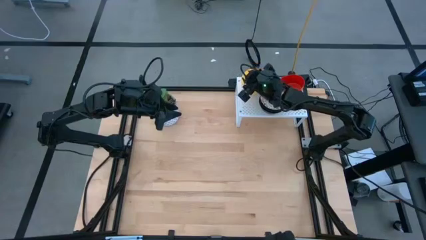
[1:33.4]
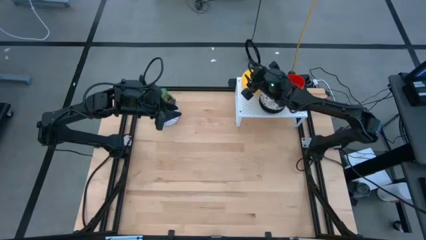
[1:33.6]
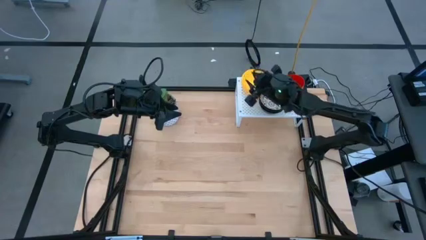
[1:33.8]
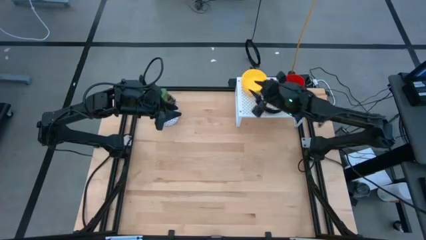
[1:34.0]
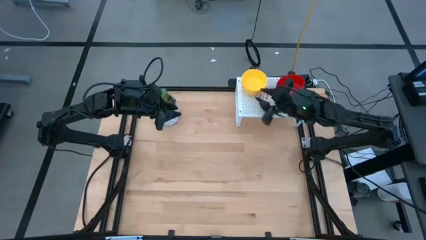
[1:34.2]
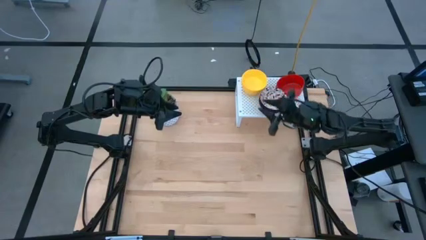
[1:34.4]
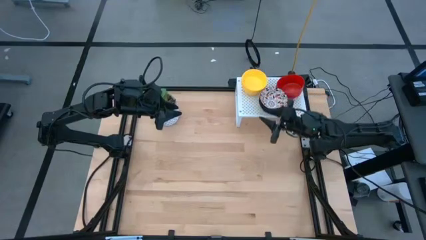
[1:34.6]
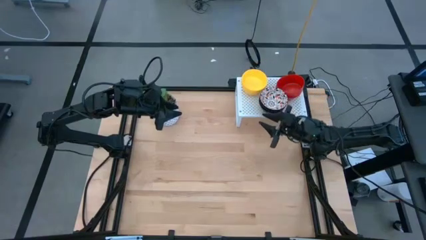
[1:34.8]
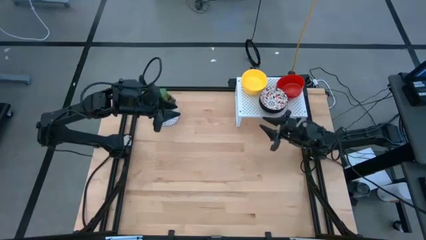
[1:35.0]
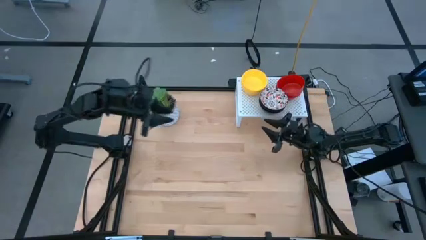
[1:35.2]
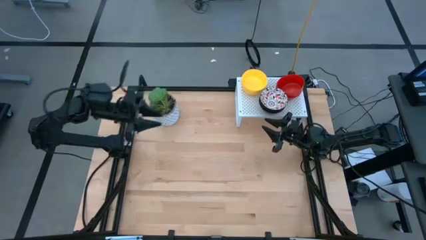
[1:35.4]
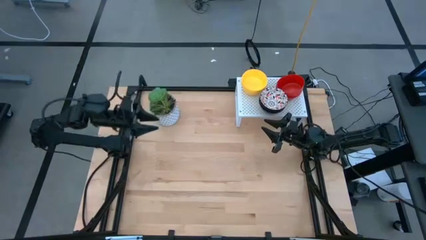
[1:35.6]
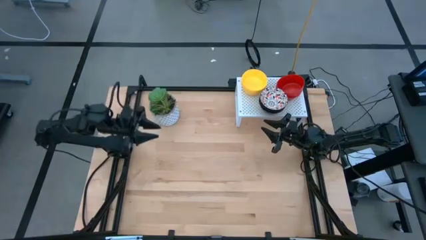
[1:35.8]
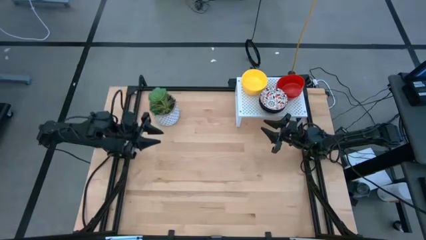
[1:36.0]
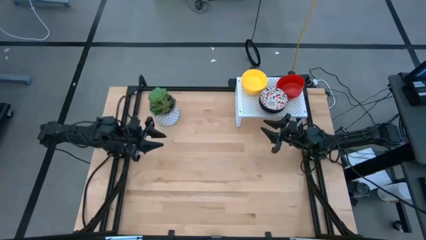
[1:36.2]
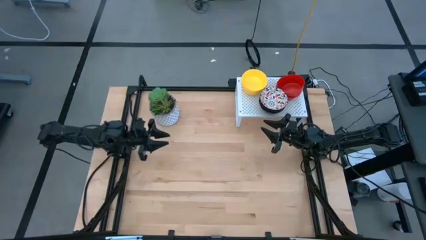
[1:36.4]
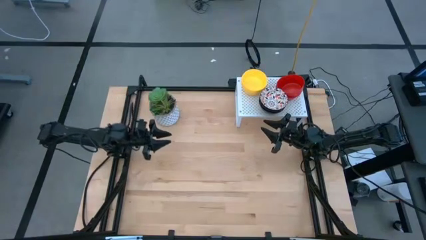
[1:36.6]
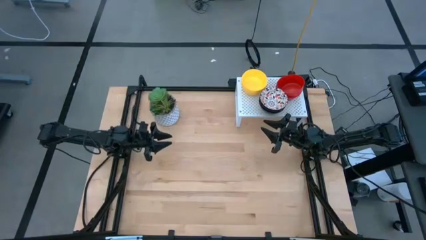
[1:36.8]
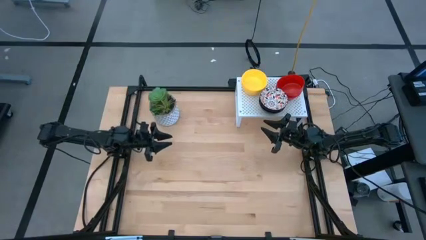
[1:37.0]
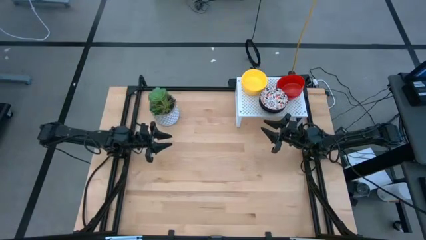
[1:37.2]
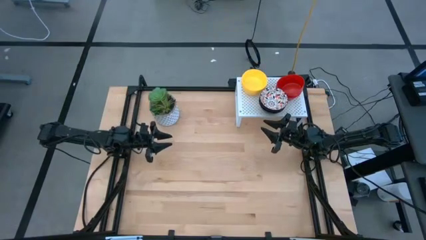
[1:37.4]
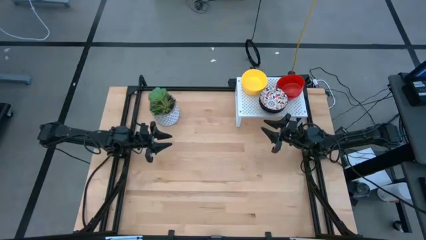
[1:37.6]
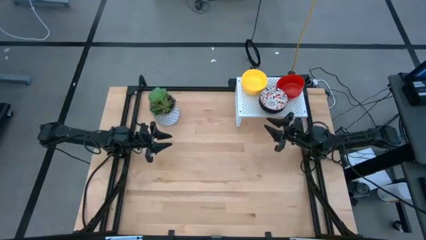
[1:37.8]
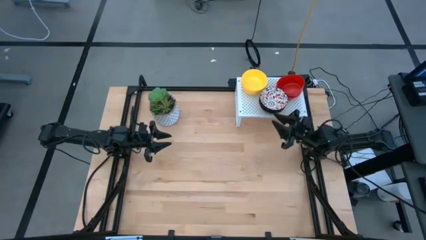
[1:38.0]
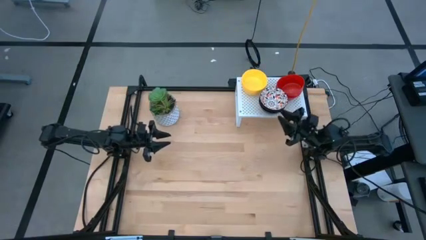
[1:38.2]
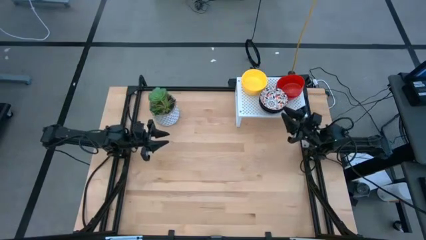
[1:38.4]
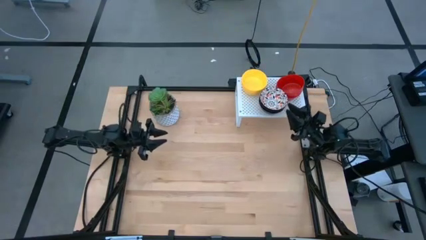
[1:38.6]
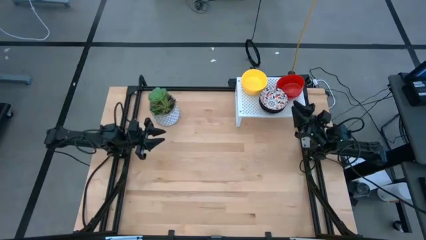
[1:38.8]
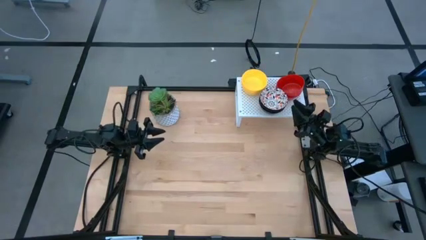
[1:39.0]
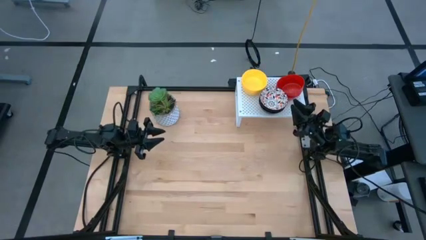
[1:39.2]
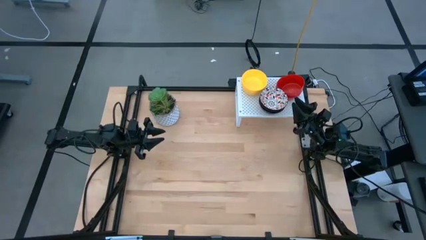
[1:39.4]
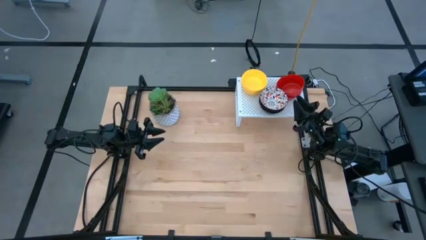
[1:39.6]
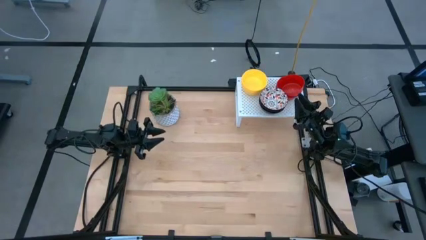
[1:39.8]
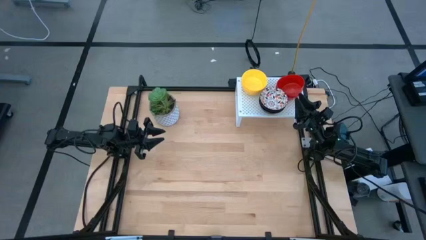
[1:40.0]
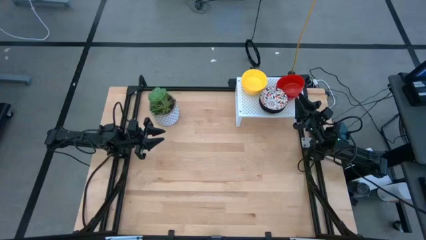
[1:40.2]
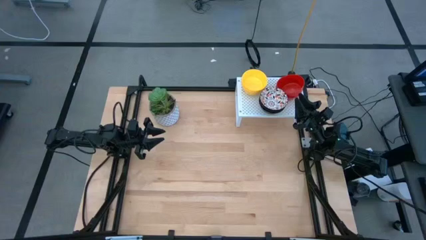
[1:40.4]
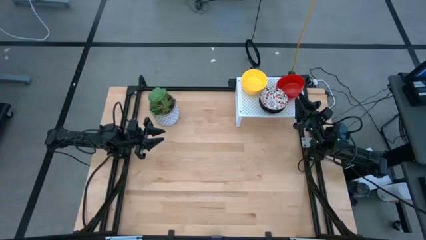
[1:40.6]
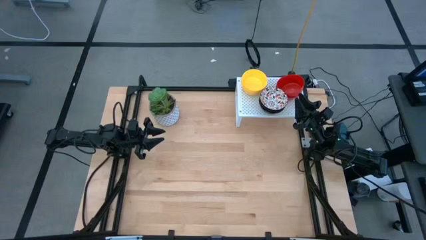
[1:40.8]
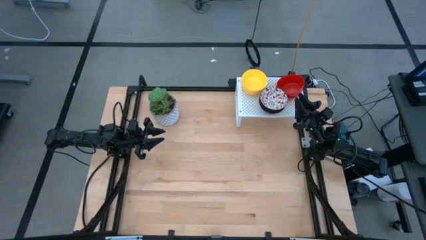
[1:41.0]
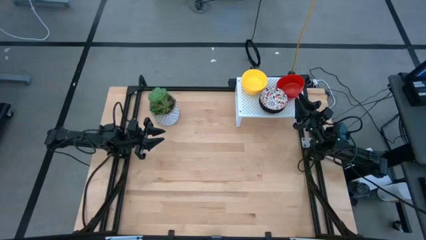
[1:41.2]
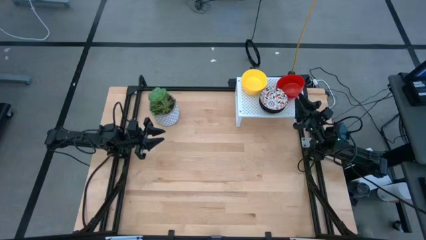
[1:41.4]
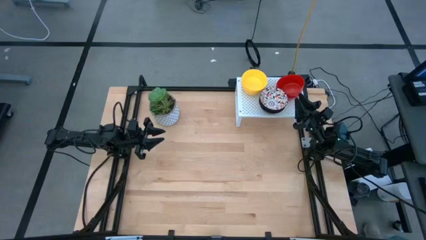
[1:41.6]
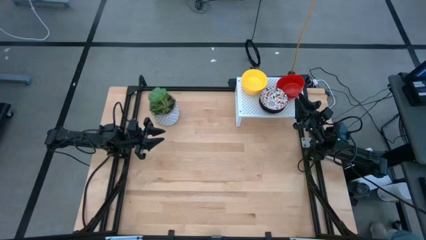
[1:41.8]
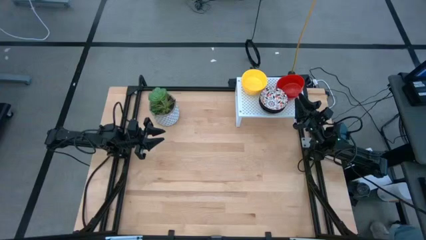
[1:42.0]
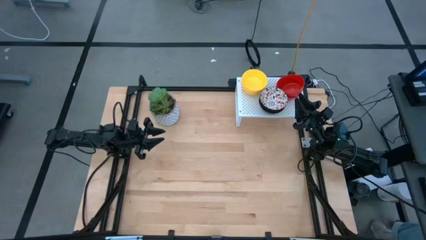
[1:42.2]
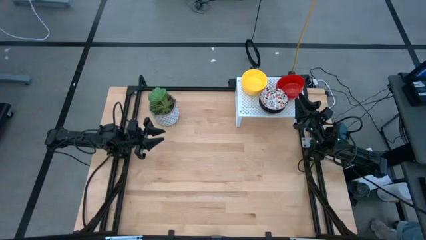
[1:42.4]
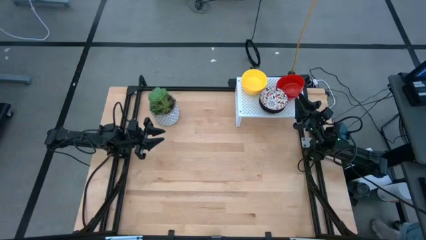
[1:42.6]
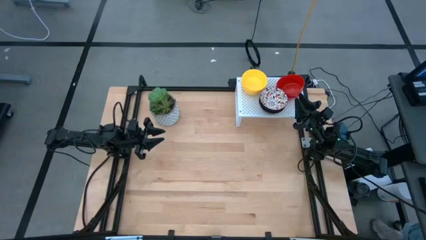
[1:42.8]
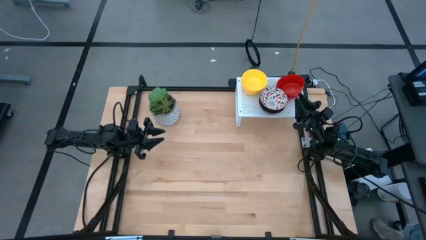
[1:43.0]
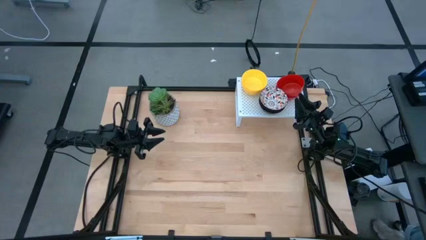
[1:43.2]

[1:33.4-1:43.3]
Task: Pick & Place Mini bowls
Return to Home Position

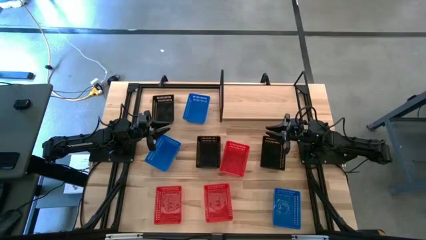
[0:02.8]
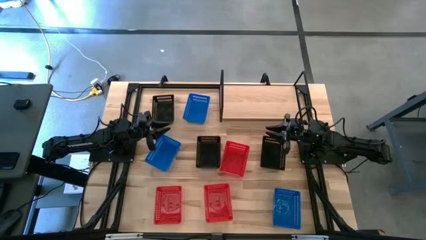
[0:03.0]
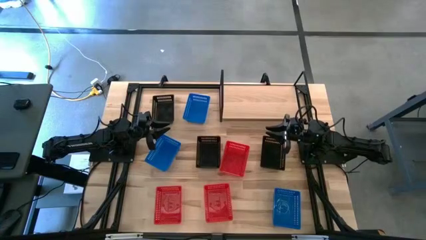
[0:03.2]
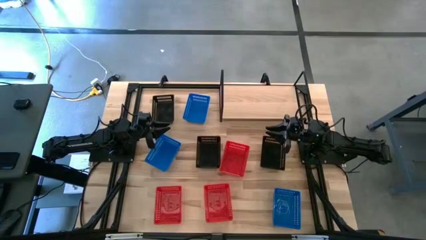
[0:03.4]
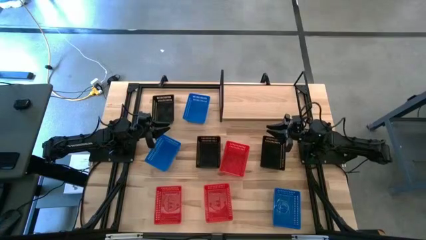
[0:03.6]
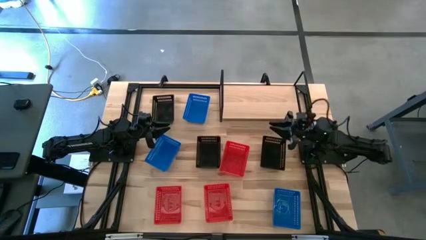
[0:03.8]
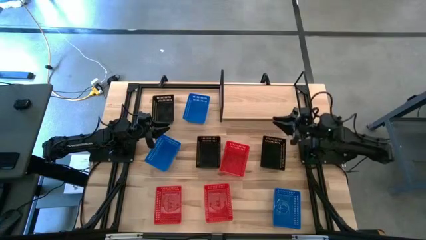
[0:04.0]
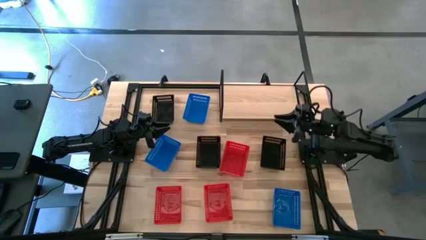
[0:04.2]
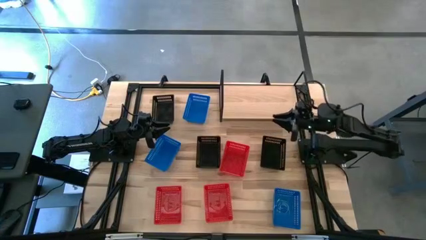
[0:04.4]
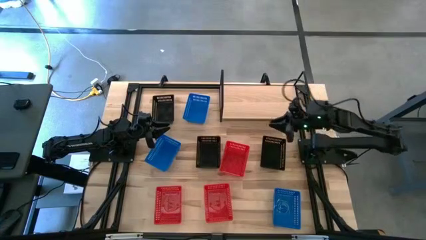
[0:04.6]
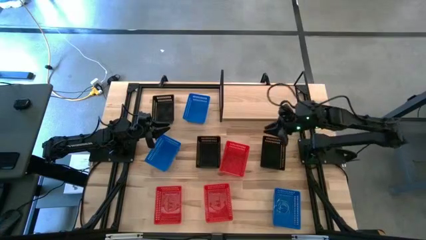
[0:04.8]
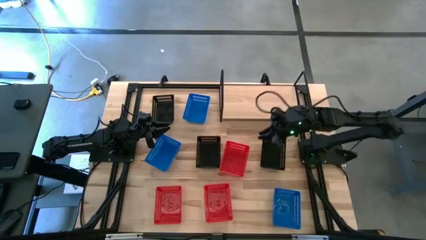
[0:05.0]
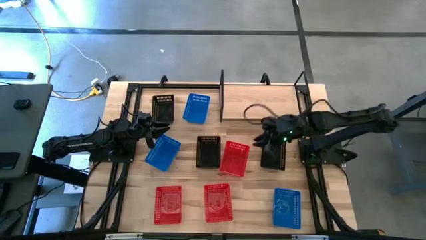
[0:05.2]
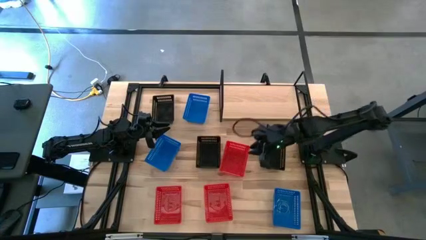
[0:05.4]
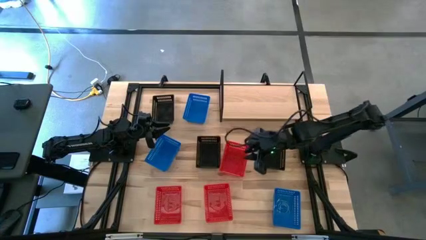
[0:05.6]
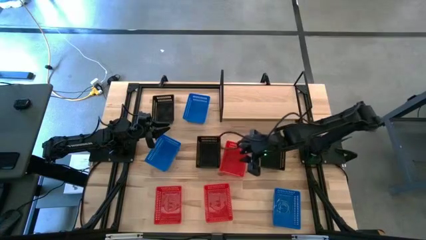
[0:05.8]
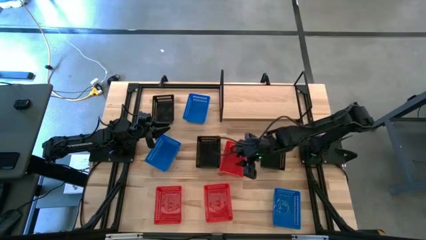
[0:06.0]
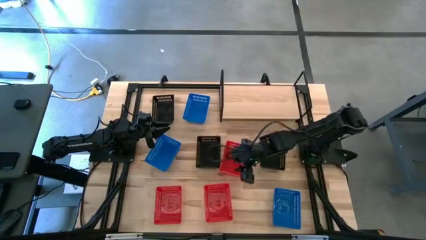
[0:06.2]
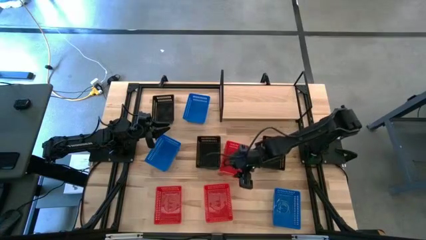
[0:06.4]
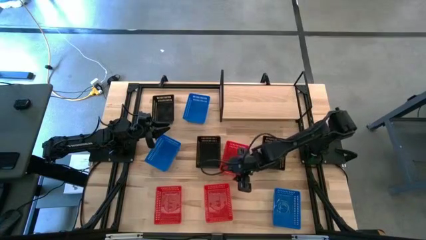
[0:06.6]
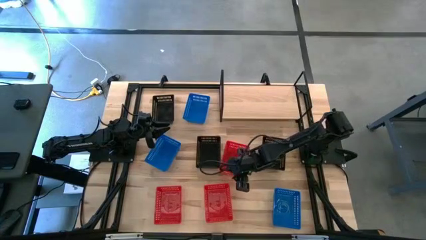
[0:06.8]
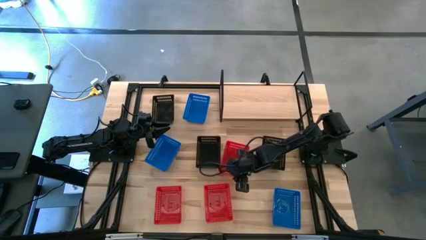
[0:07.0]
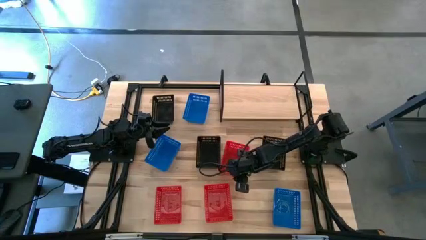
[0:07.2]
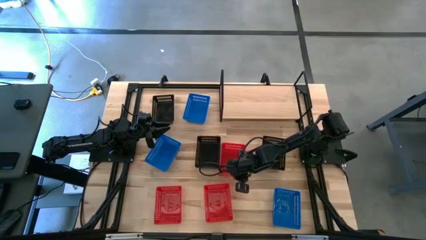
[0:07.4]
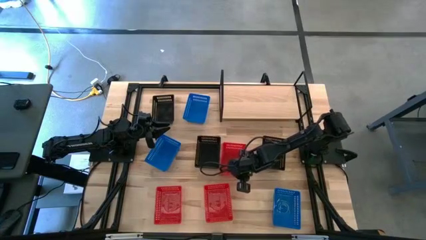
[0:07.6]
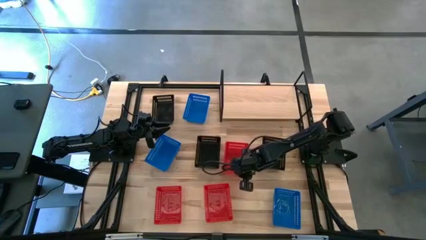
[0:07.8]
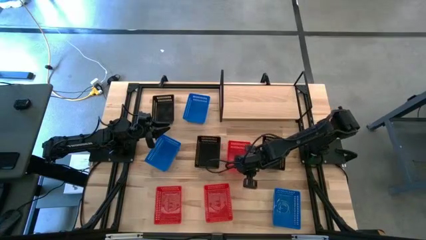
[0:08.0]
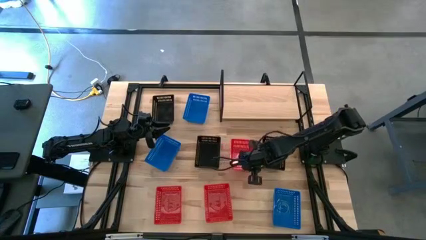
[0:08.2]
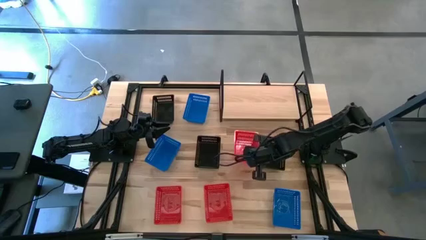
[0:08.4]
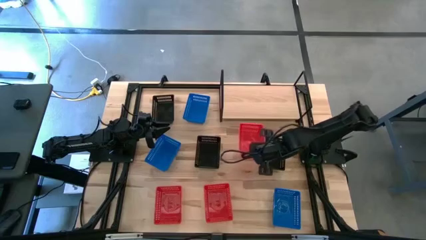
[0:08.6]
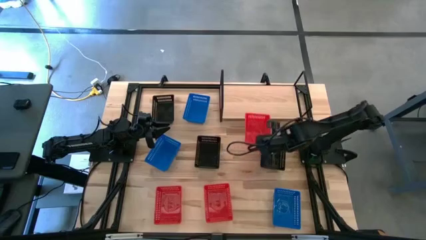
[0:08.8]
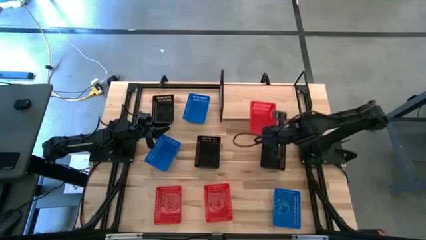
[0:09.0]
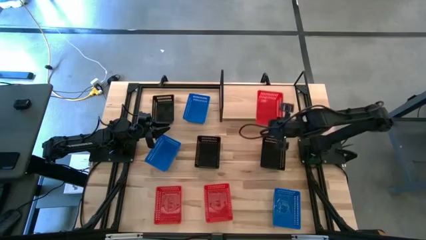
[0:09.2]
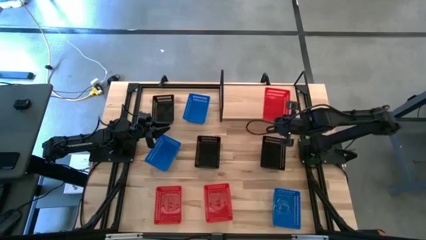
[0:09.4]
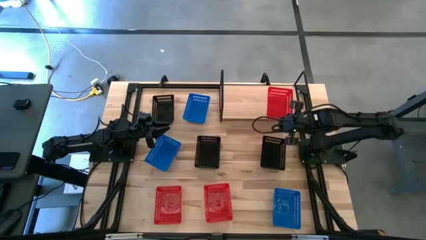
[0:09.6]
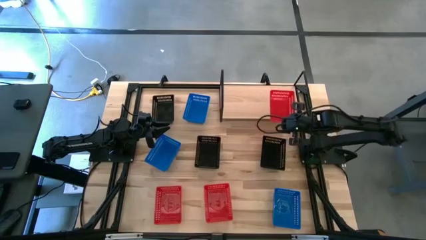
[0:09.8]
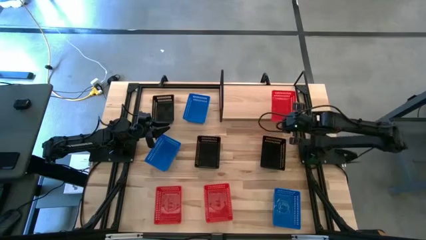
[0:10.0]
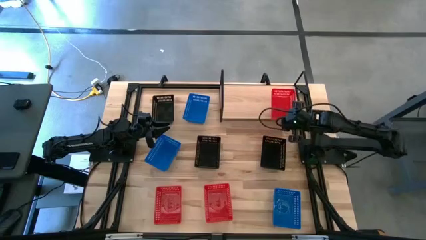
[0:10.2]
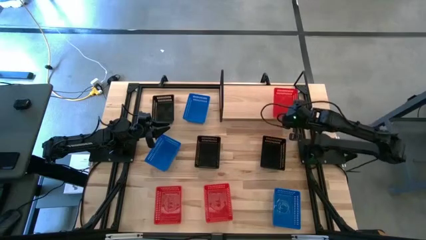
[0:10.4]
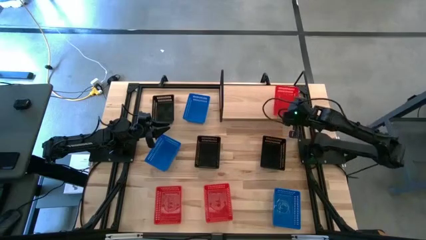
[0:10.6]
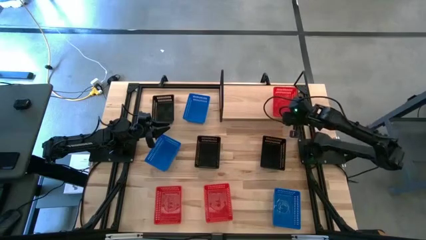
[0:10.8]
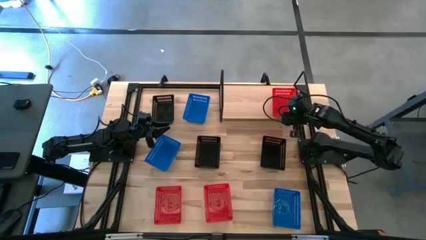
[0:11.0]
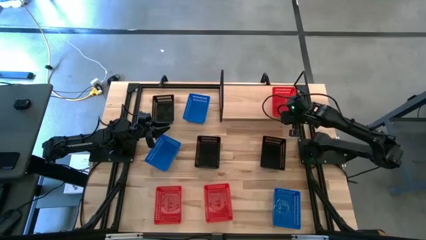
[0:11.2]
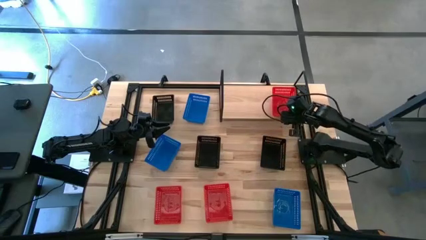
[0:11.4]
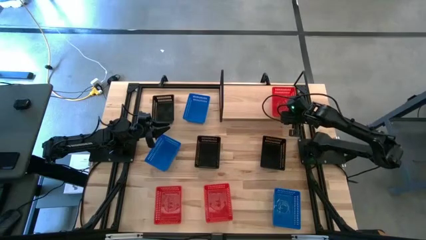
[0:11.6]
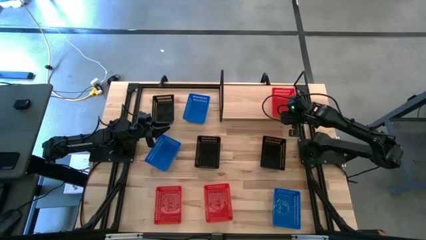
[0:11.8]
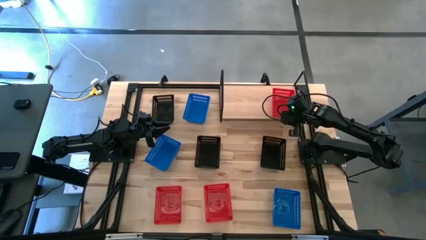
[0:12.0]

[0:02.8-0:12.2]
Task: Stack baskets on shelf by color
Put the top red bin on the shelf
